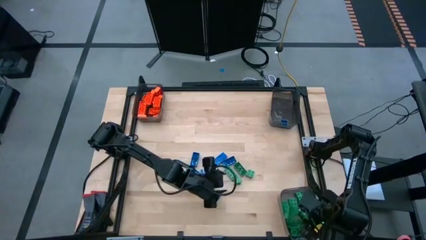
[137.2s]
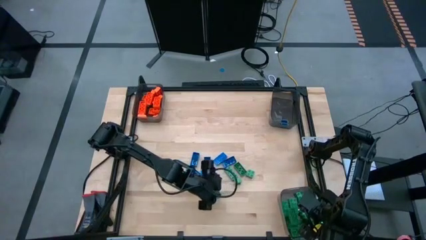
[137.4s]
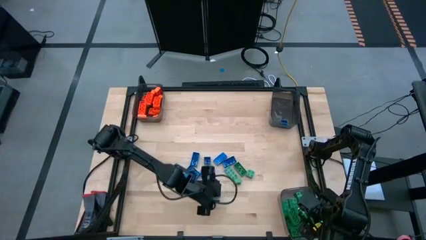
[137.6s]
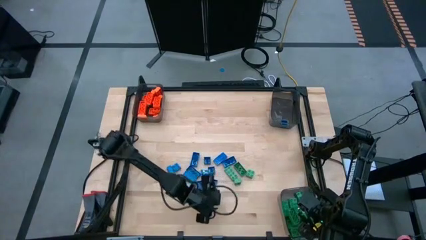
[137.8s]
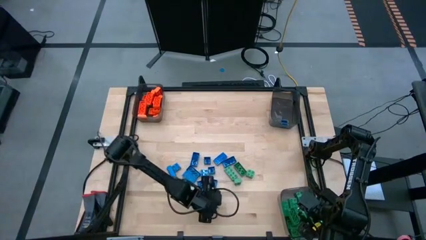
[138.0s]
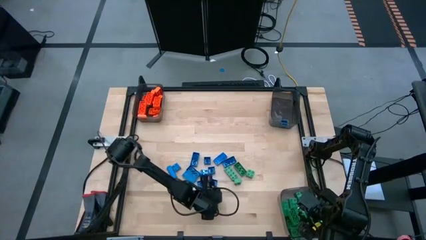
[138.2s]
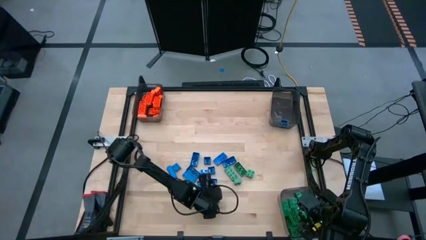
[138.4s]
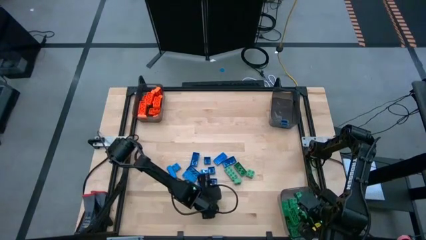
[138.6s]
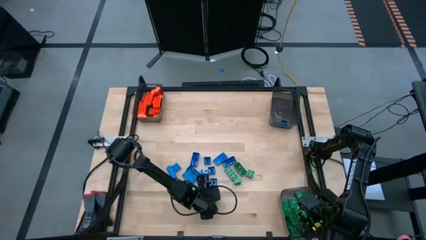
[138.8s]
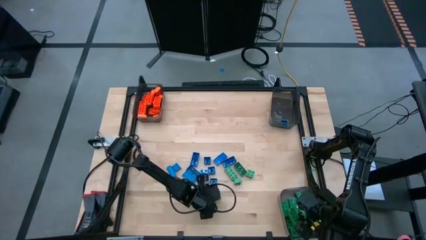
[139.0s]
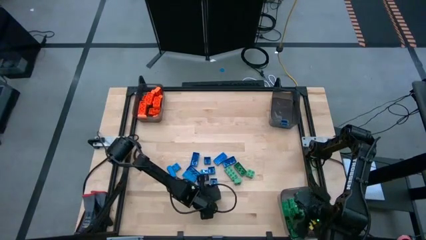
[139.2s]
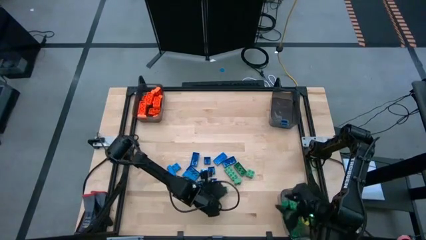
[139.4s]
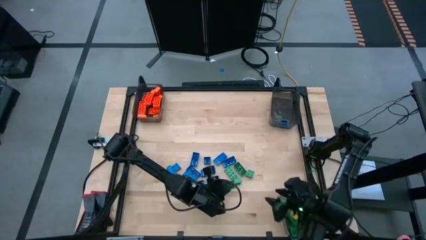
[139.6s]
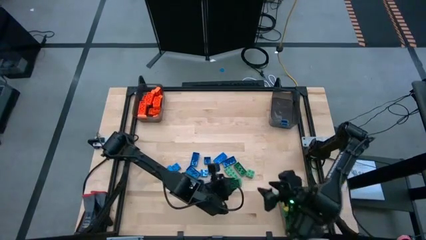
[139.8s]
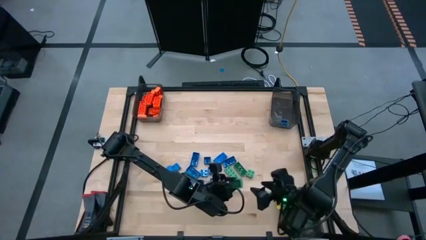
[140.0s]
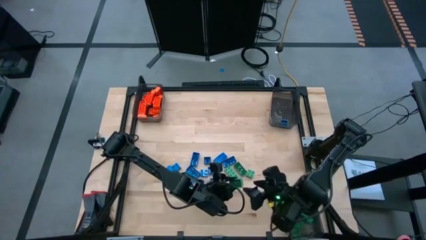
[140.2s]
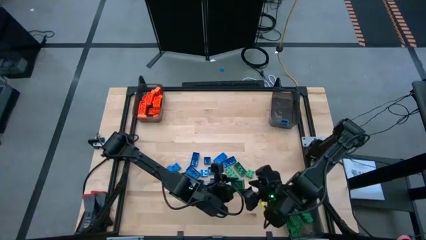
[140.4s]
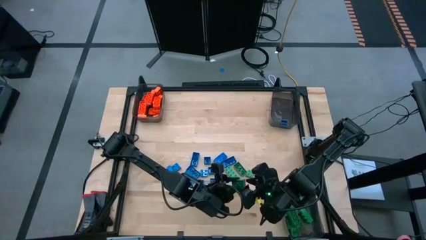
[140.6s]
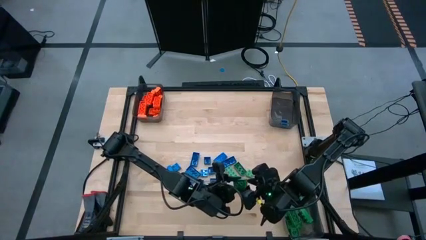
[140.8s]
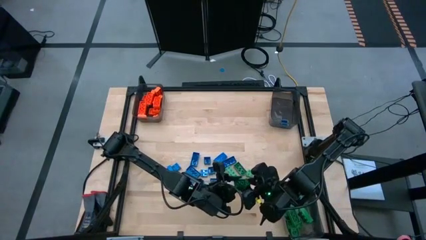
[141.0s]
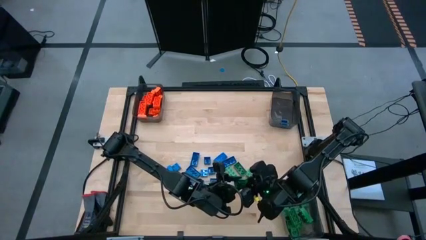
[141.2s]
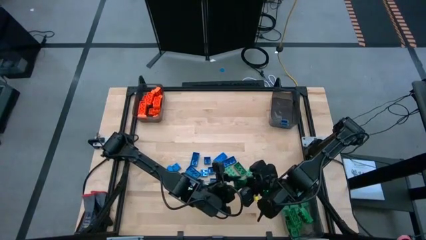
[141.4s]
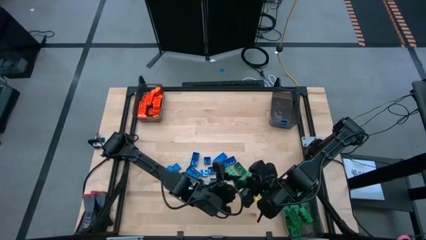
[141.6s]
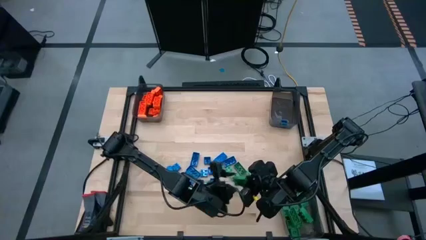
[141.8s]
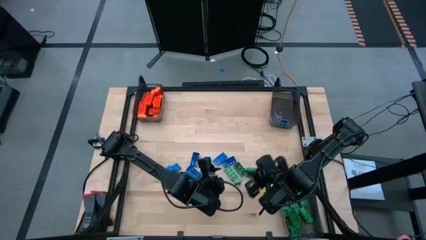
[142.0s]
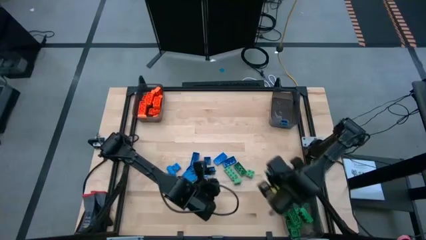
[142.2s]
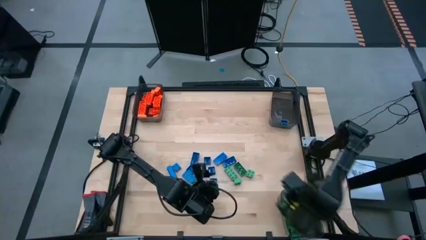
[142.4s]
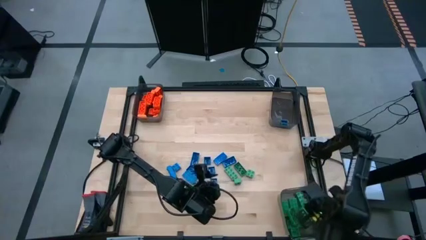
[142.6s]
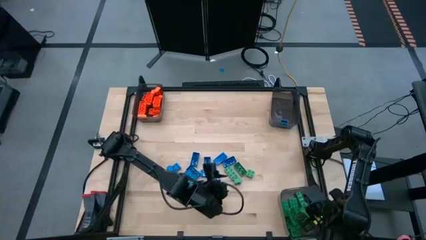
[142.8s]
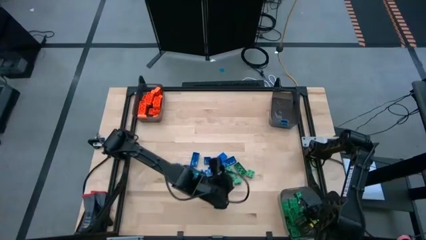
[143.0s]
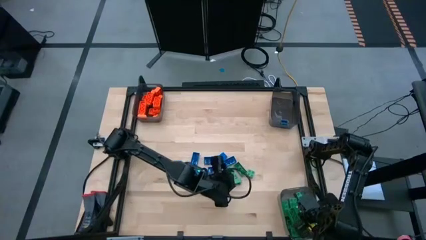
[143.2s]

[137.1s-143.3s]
Task: Sort blocks
Put the green game piece into the bottom right black bin

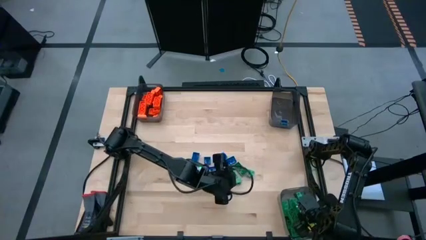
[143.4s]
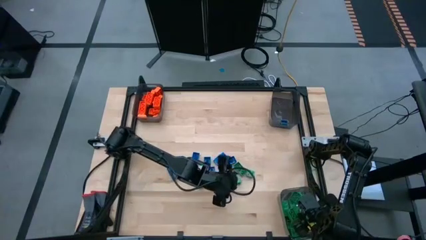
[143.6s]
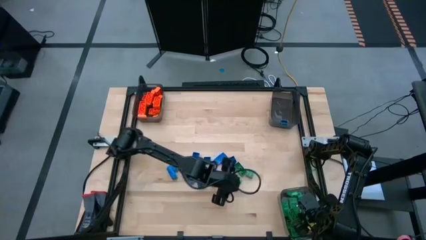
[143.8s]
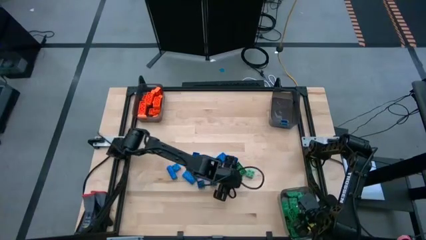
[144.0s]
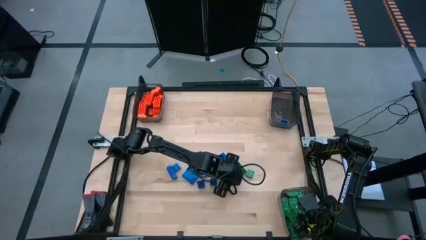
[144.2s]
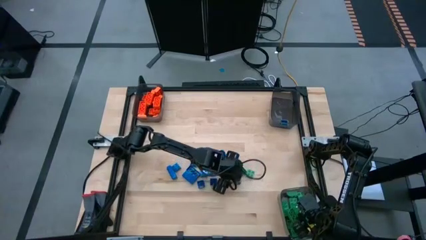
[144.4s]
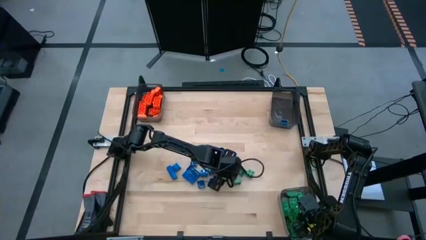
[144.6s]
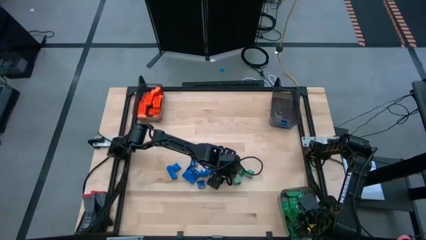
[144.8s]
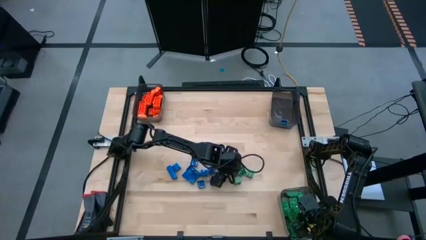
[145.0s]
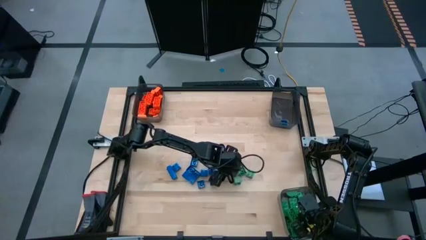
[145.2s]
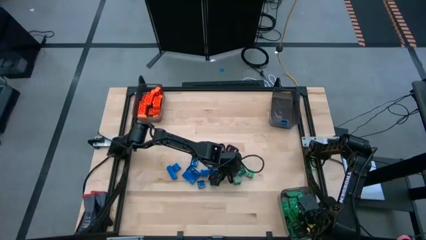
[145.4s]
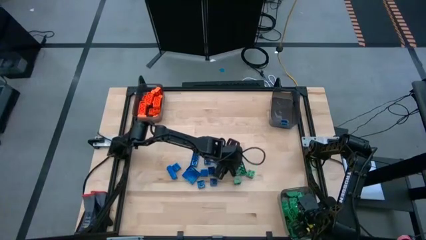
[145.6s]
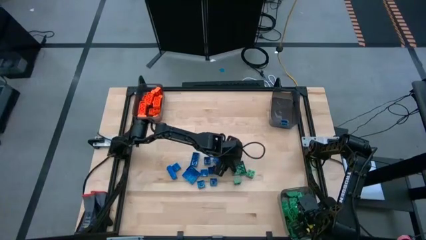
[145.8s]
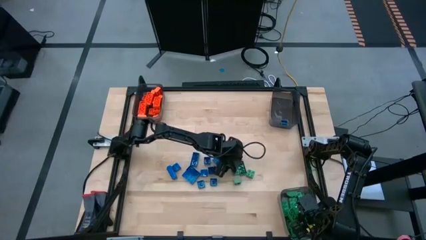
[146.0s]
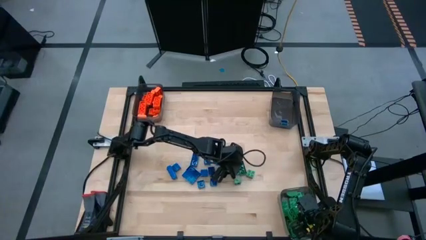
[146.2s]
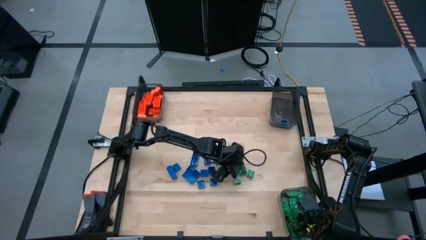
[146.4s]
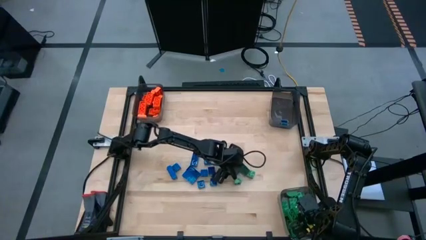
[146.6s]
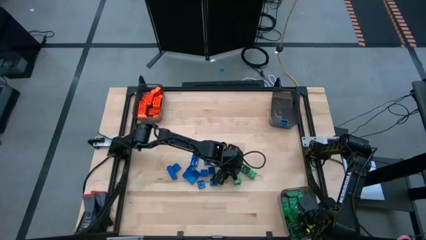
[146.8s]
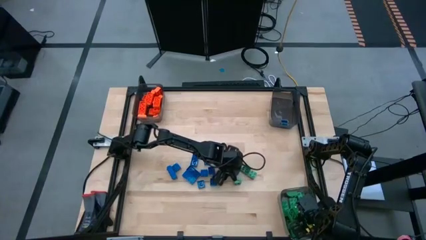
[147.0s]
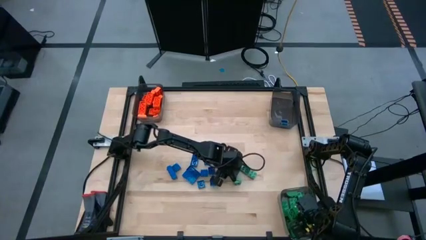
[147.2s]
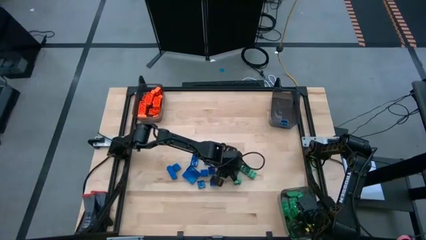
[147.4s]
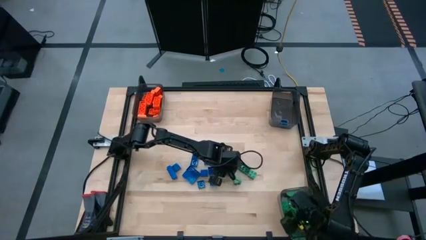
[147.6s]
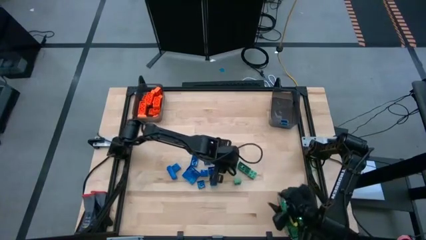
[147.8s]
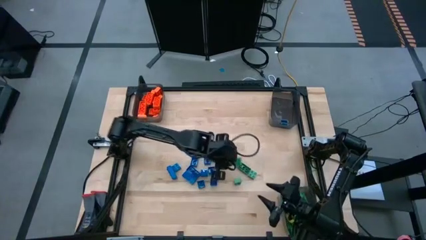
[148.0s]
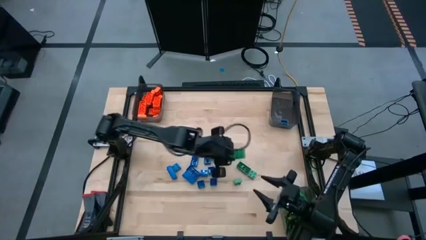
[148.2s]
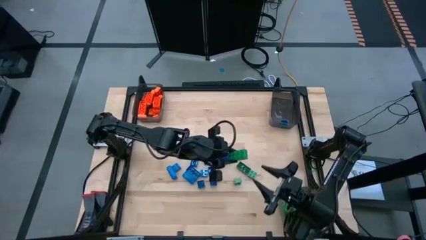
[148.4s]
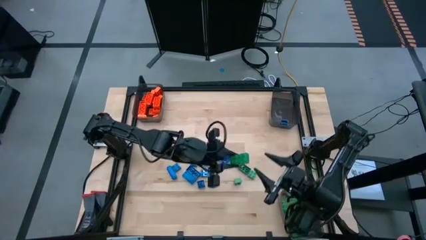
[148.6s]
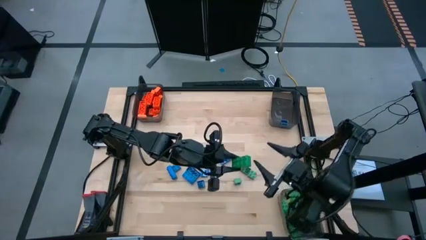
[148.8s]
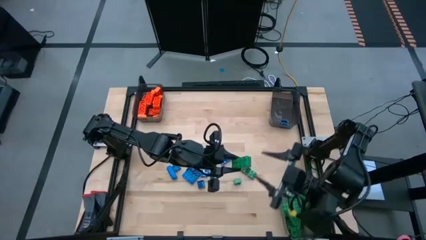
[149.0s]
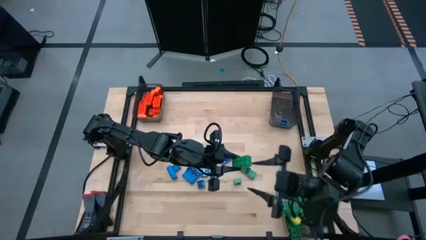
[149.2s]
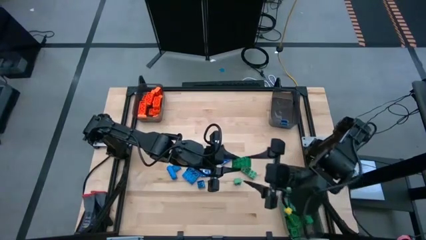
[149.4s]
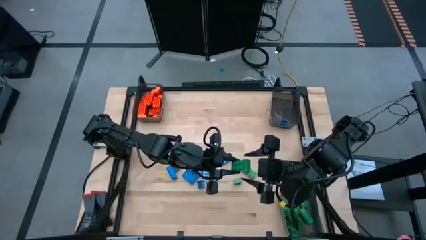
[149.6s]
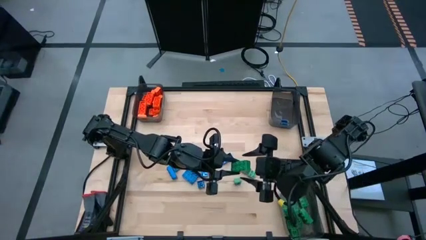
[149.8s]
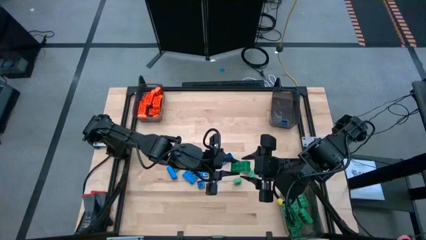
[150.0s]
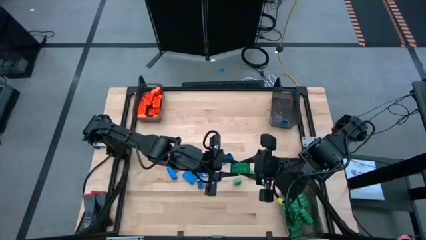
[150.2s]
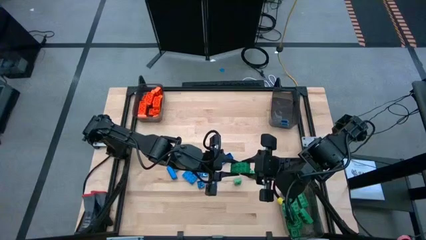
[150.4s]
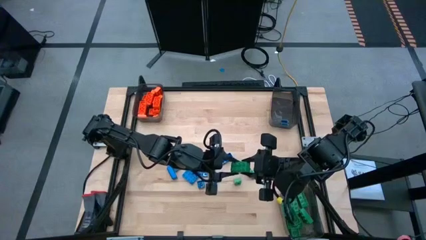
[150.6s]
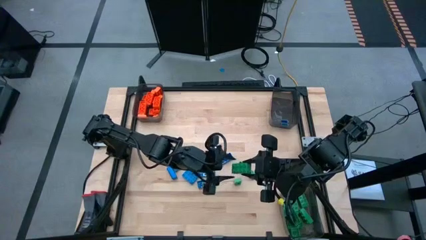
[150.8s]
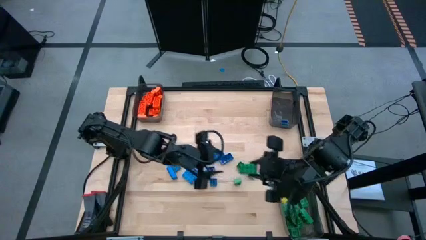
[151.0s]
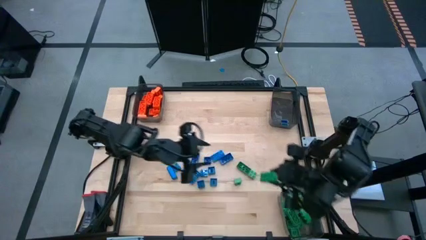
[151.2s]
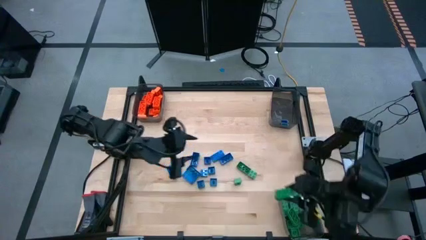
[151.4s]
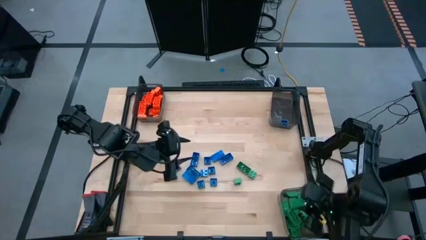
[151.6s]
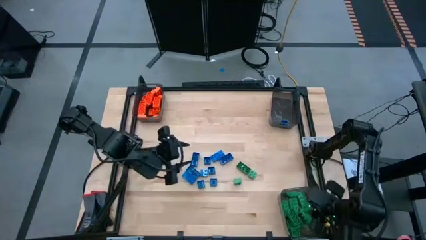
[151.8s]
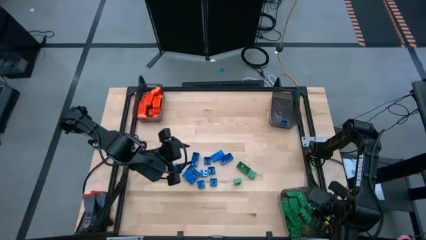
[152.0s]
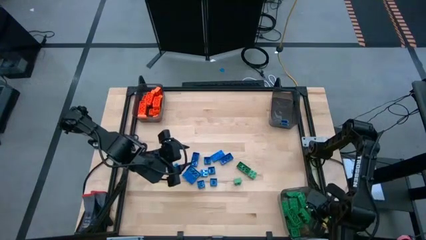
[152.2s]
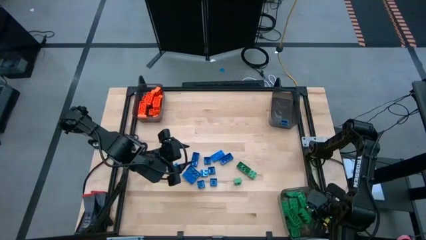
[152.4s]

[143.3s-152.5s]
Put the green game piece into the bottom right black bin
